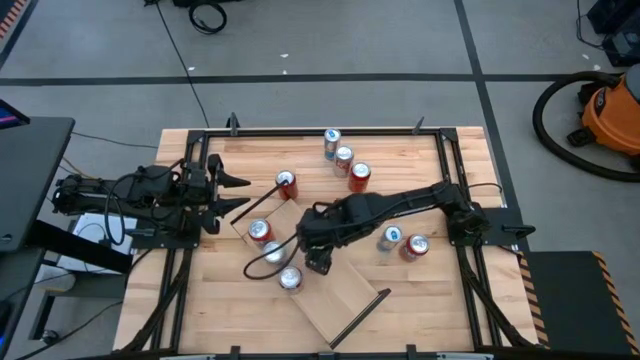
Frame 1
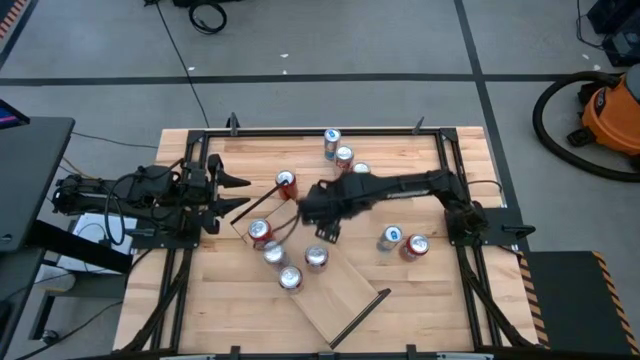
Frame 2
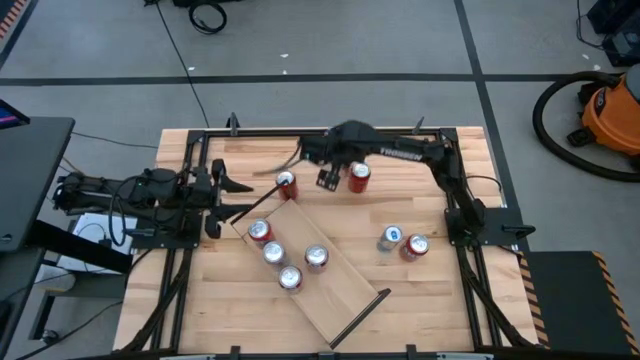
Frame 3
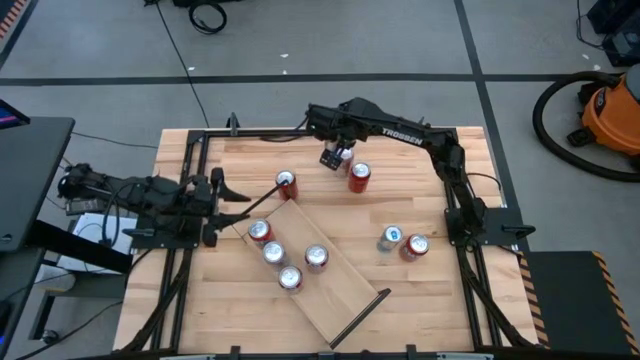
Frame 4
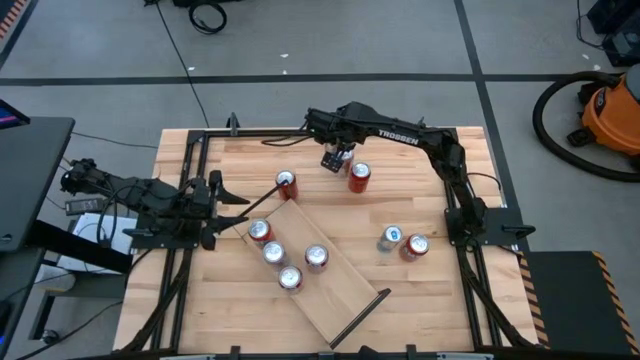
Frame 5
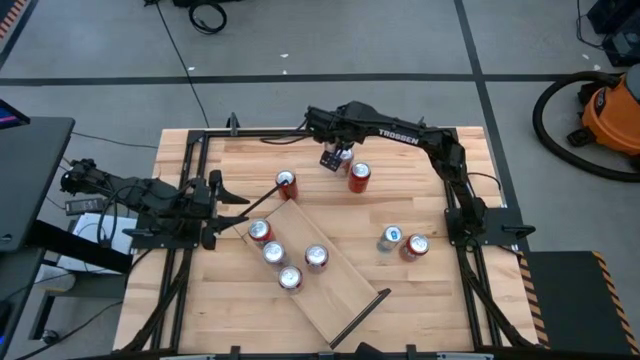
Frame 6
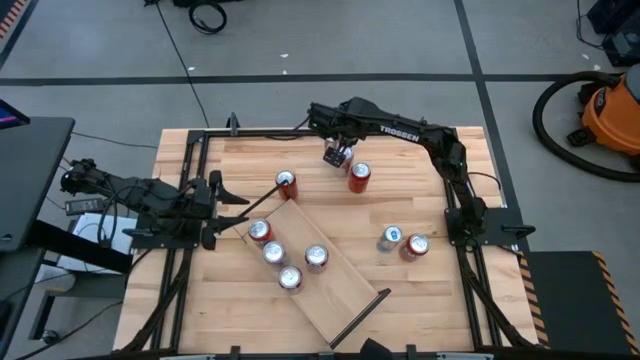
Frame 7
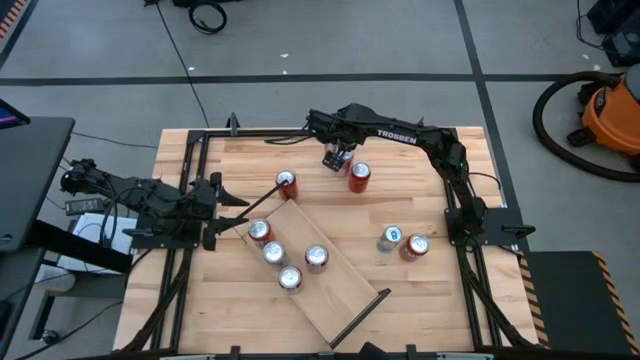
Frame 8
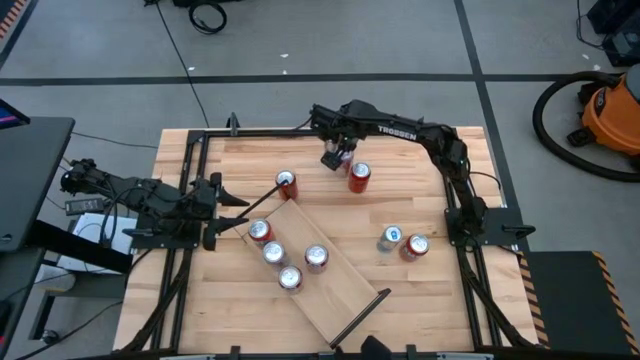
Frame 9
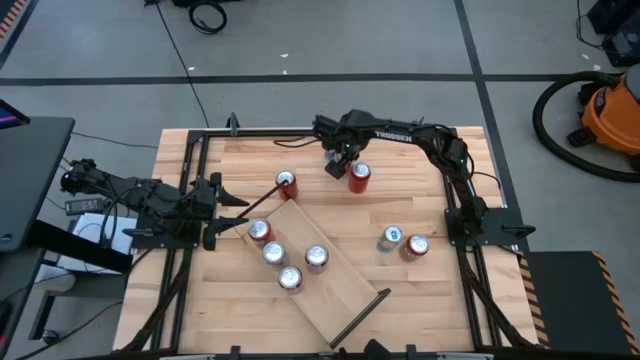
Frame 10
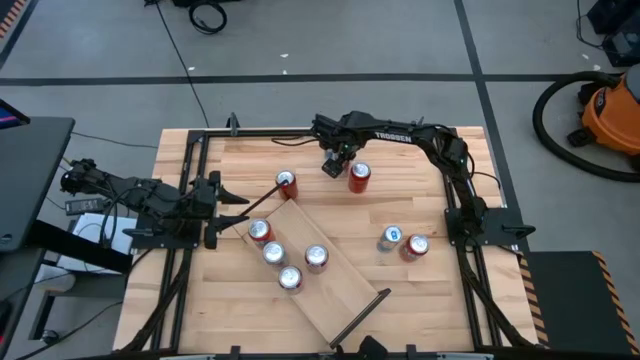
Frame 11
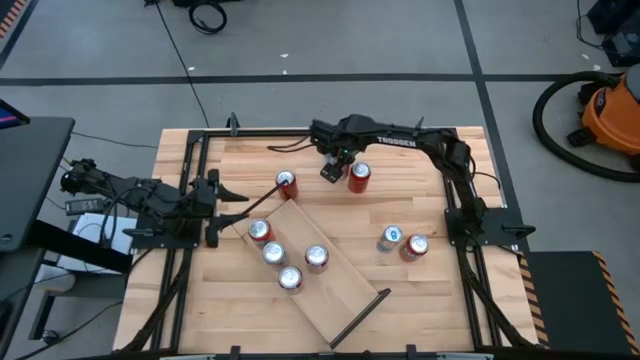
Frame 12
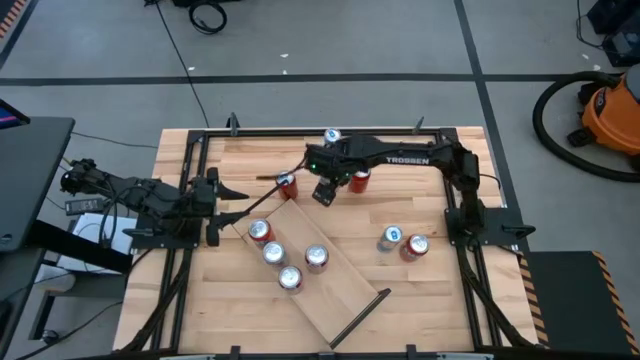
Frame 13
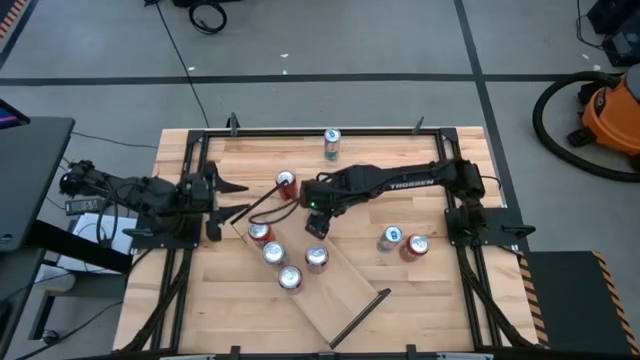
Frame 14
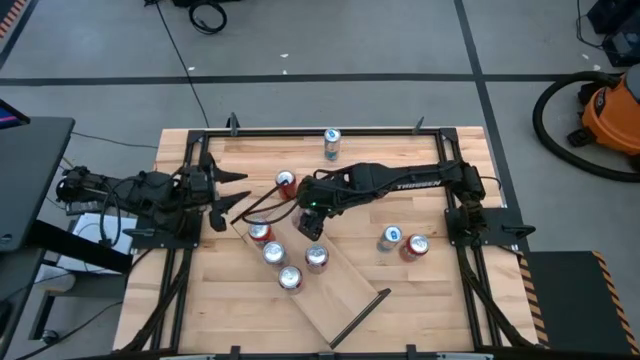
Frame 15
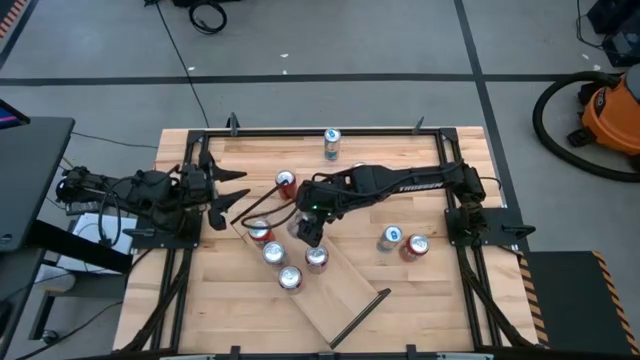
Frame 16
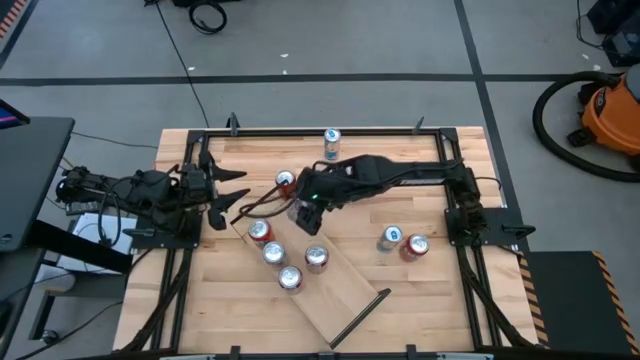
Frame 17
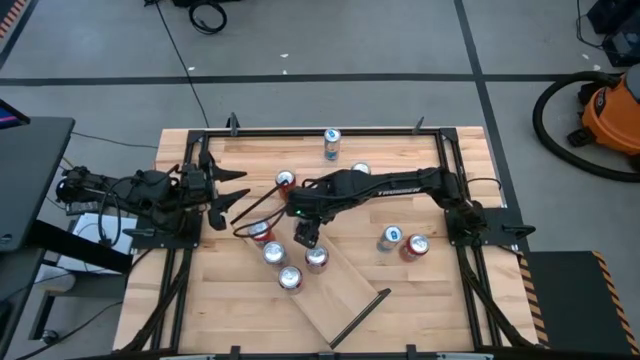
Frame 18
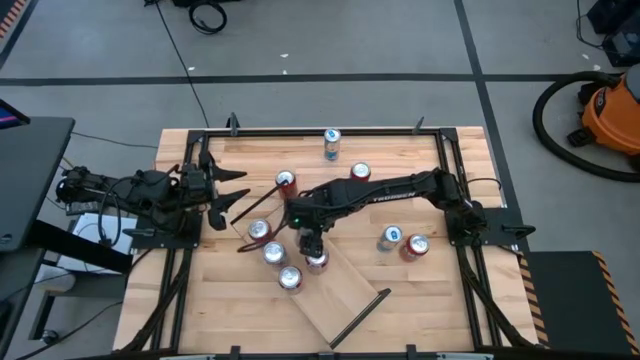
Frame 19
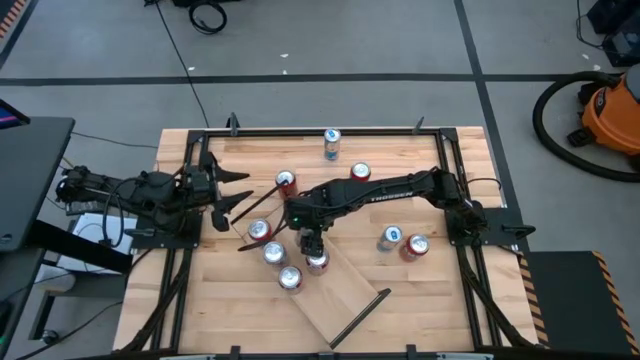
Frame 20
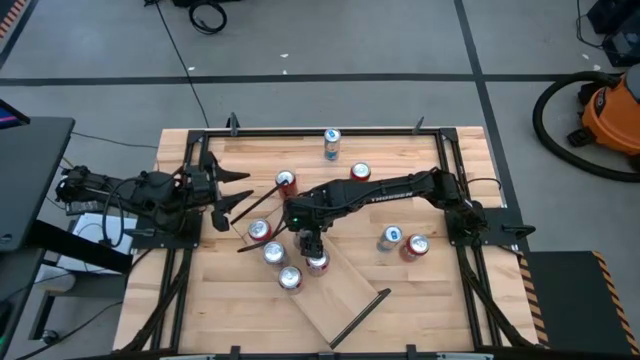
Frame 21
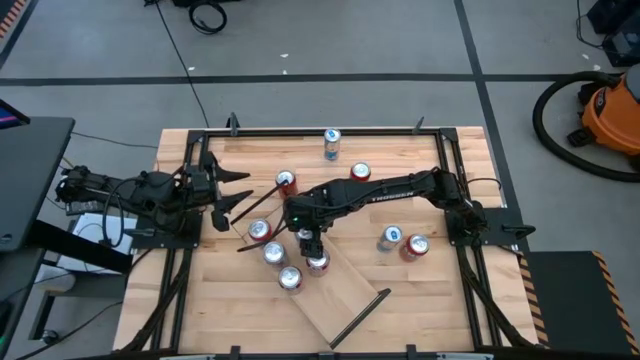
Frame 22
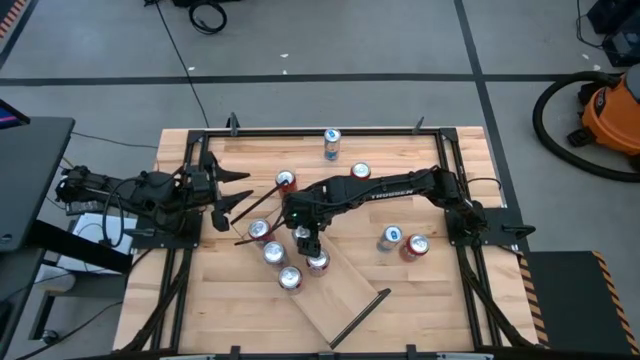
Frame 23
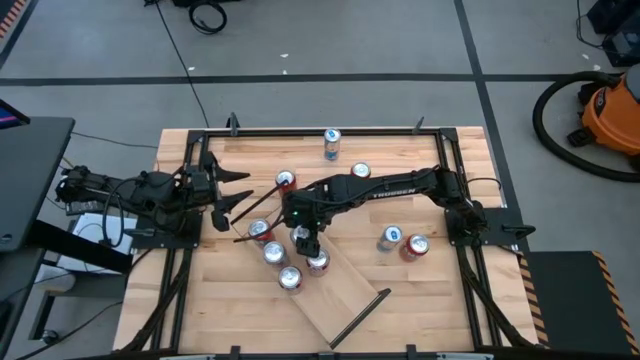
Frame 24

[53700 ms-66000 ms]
Task: Place canned beverage on shelf
Put the silver soda can on the shelf aligned with the other silver soda can

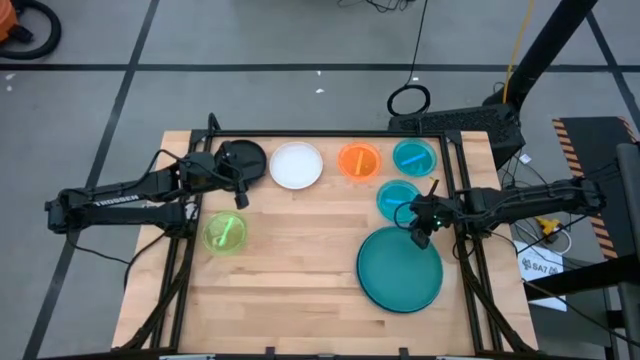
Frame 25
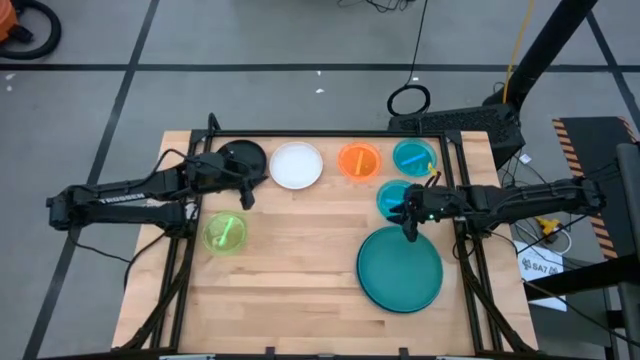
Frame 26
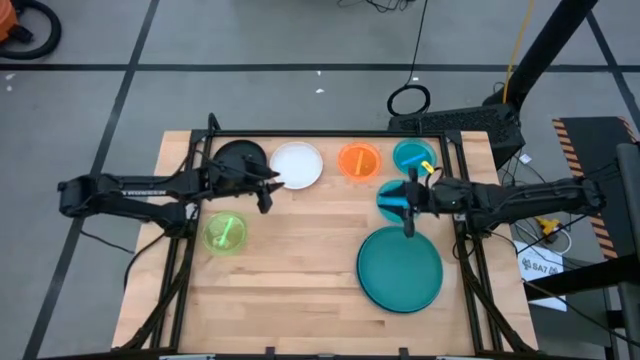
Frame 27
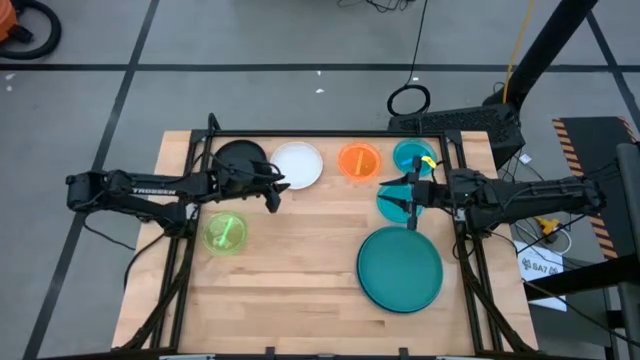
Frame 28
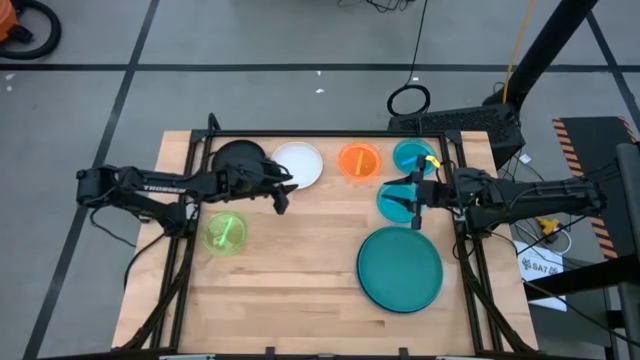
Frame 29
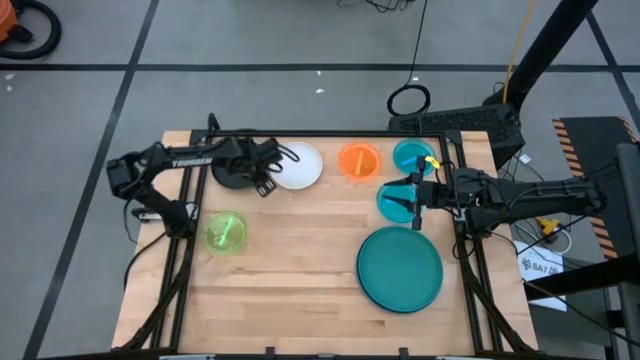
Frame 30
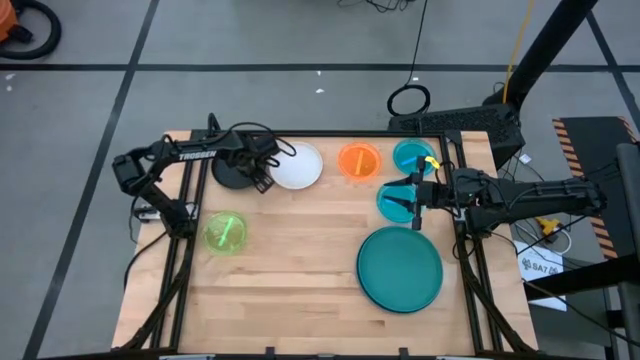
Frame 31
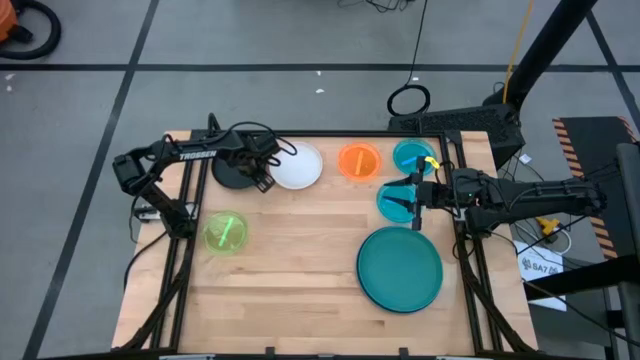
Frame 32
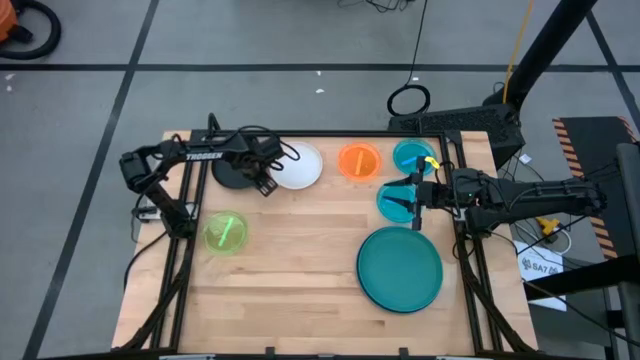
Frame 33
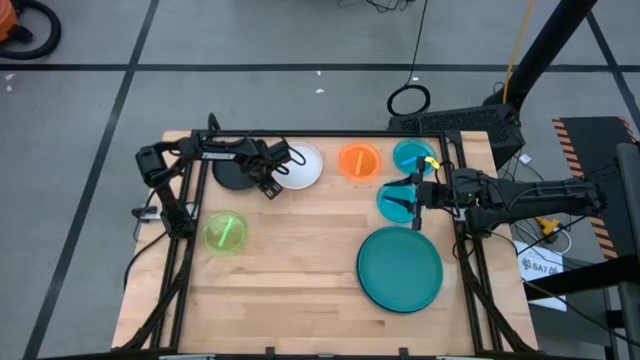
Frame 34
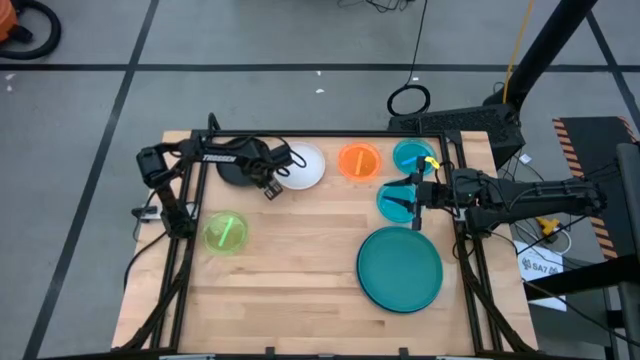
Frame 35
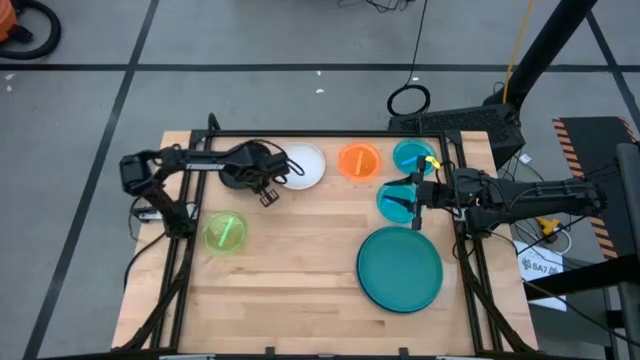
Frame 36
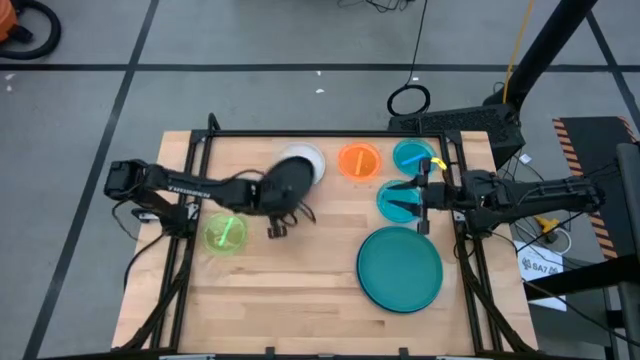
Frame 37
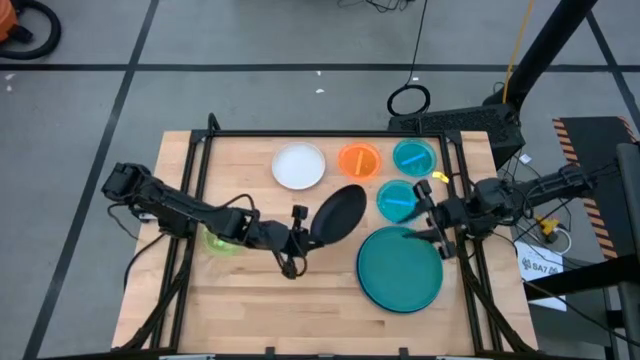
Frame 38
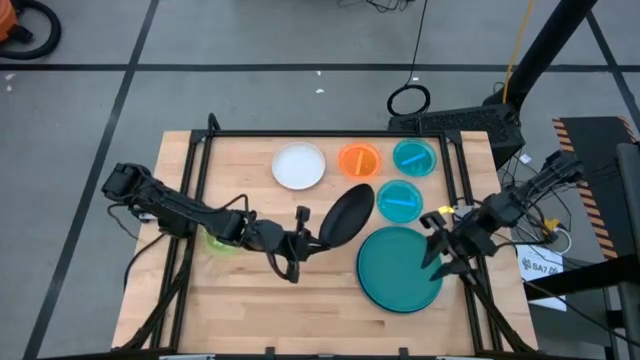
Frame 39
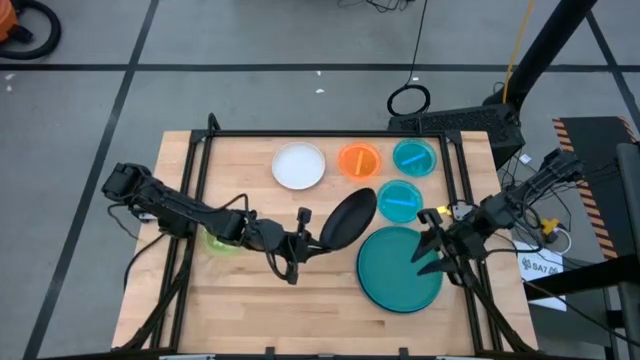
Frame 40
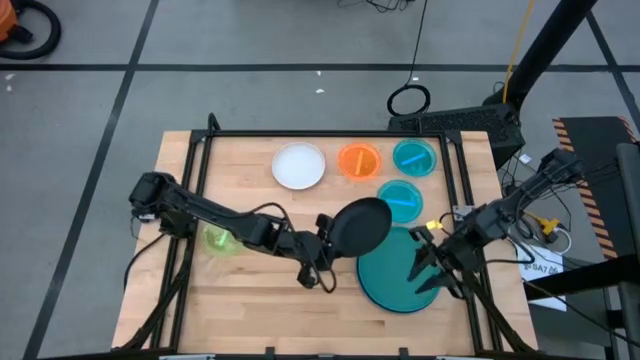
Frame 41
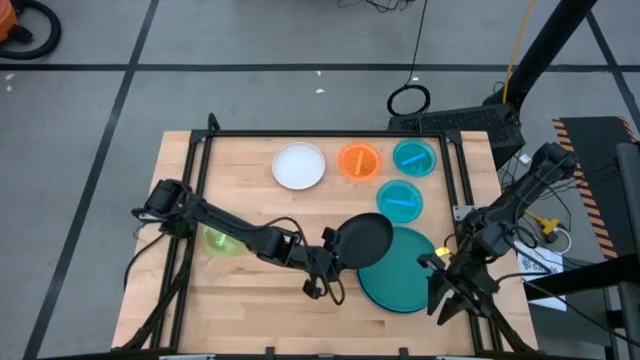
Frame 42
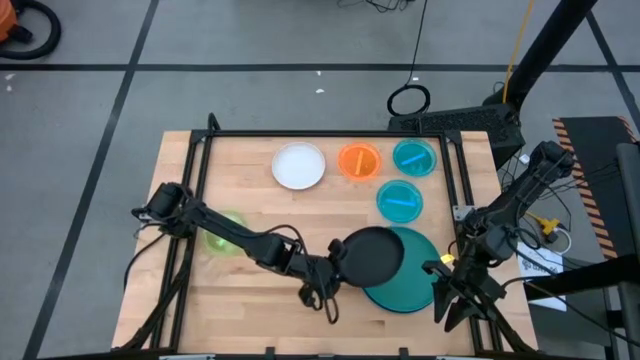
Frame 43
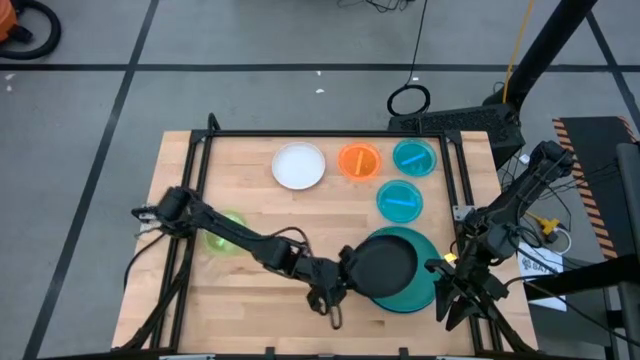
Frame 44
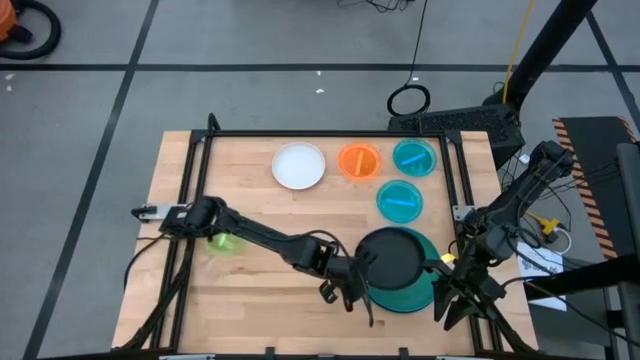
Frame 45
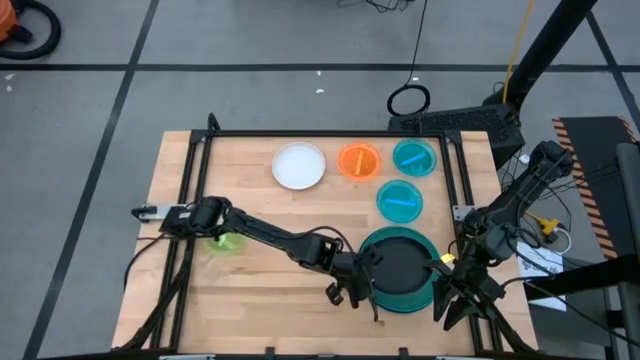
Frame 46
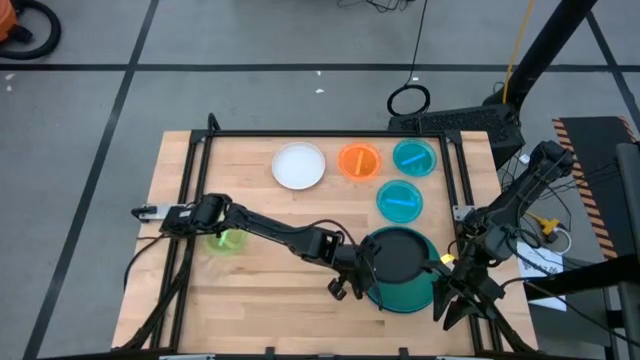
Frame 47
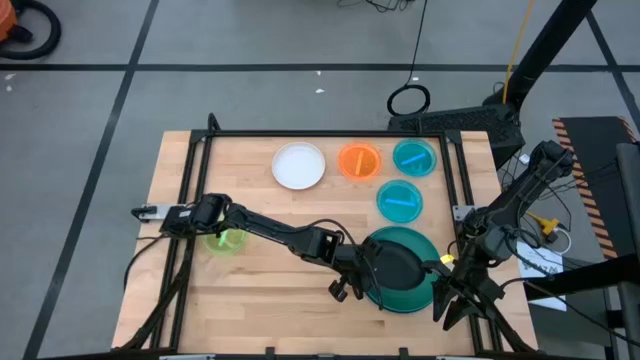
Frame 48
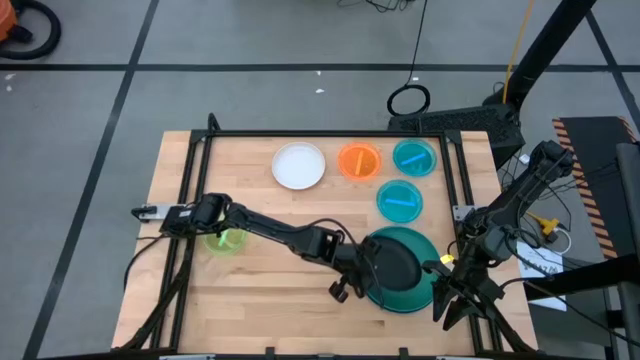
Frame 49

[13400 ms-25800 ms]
Task: Stack plastic plates
Stack the black plate on top of the green plate
